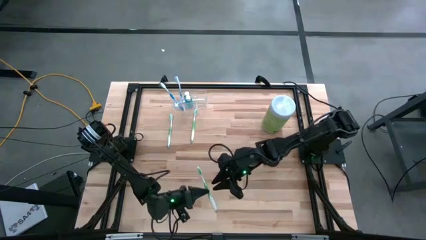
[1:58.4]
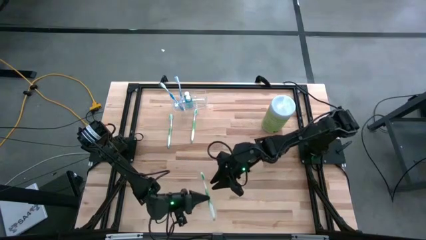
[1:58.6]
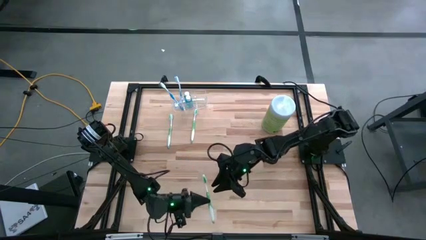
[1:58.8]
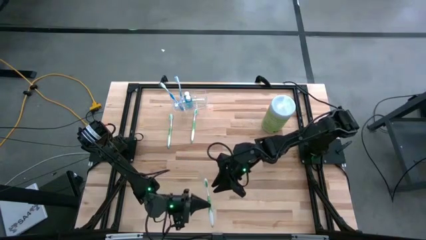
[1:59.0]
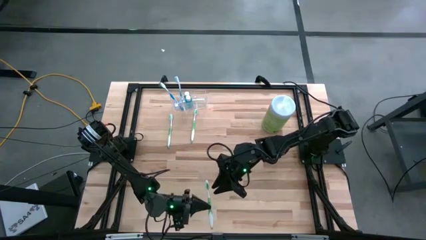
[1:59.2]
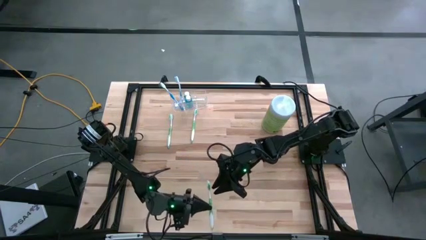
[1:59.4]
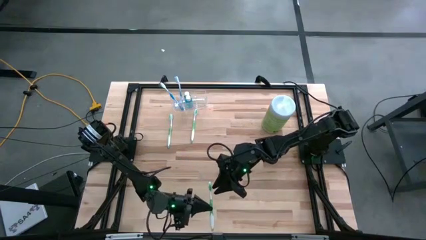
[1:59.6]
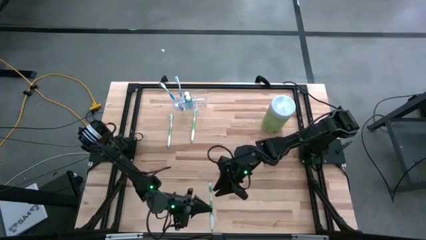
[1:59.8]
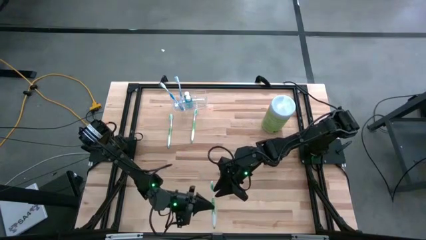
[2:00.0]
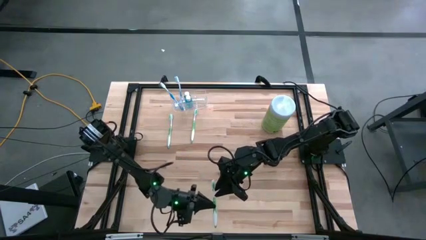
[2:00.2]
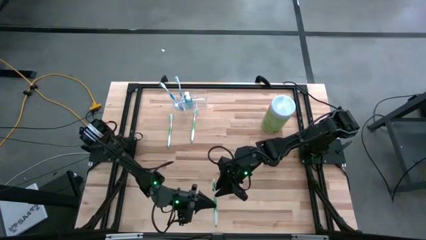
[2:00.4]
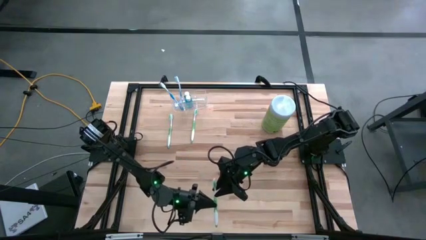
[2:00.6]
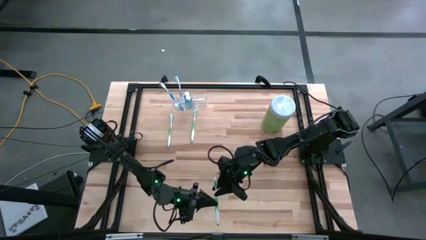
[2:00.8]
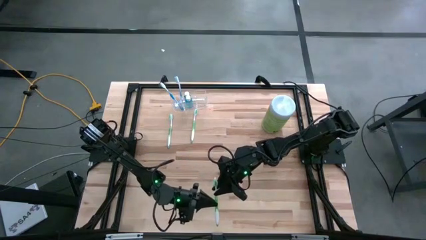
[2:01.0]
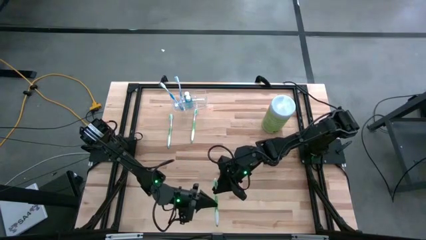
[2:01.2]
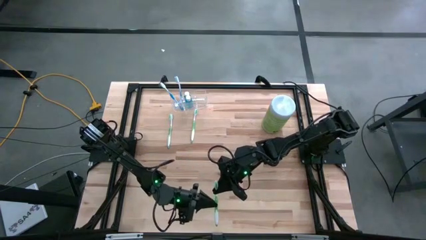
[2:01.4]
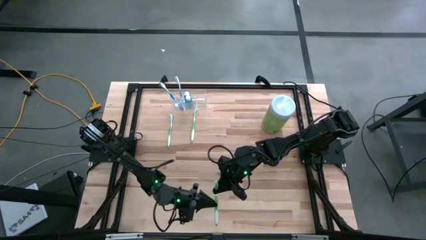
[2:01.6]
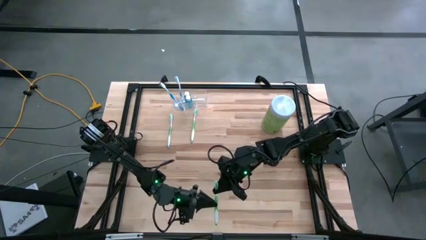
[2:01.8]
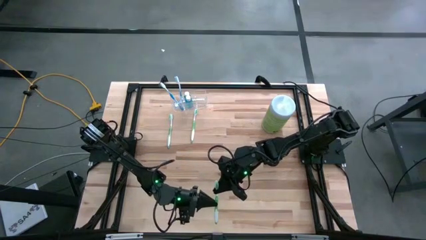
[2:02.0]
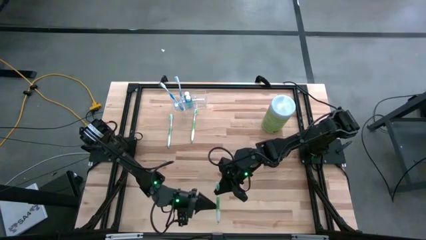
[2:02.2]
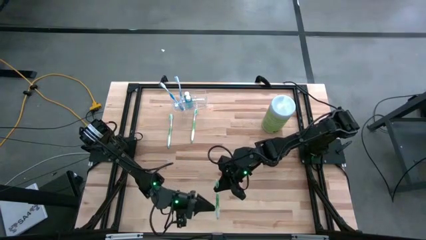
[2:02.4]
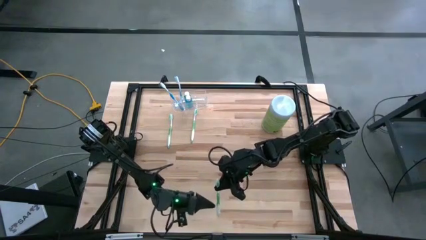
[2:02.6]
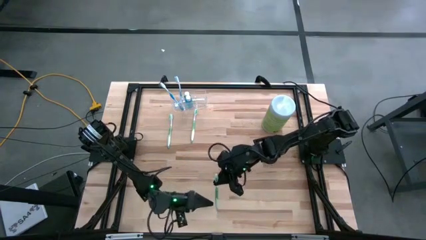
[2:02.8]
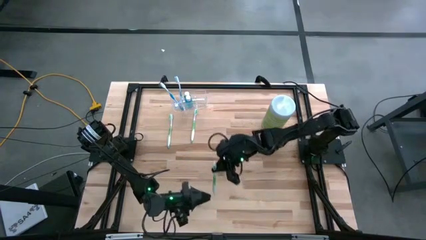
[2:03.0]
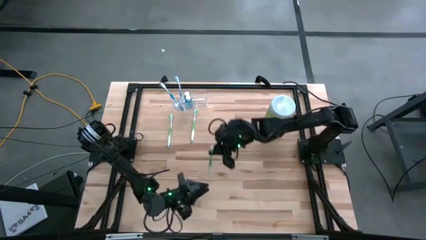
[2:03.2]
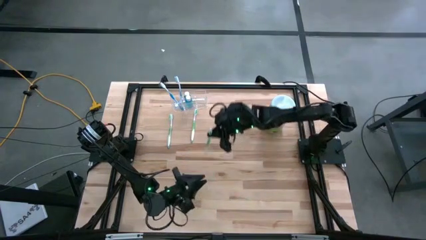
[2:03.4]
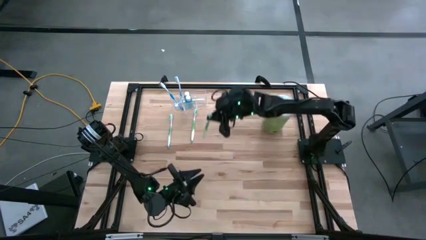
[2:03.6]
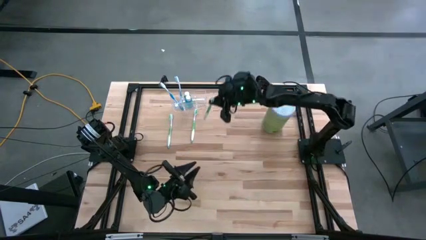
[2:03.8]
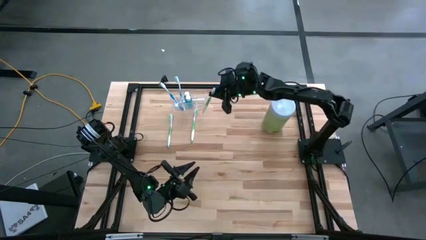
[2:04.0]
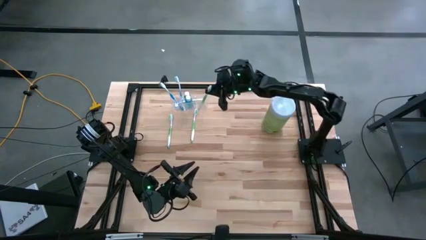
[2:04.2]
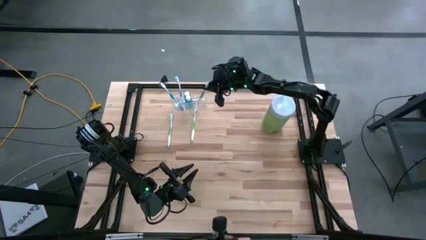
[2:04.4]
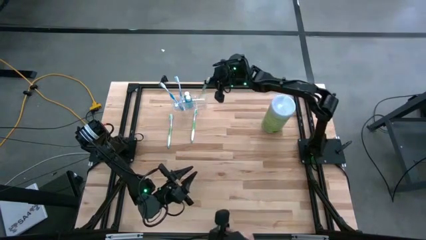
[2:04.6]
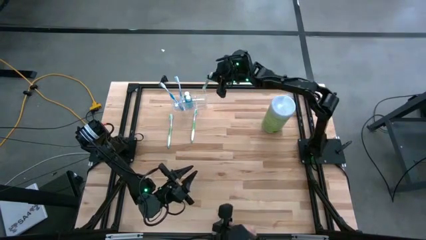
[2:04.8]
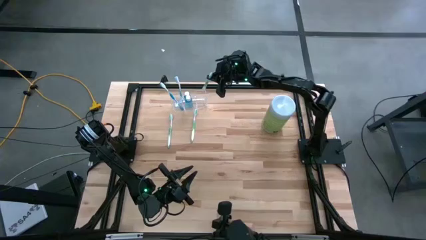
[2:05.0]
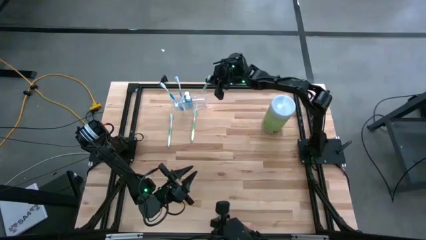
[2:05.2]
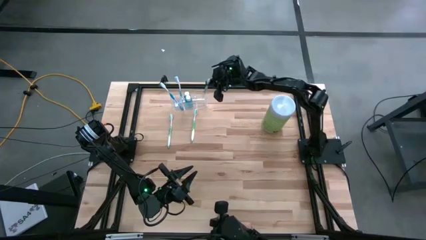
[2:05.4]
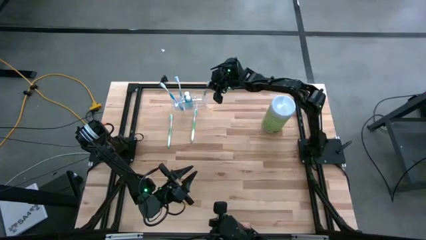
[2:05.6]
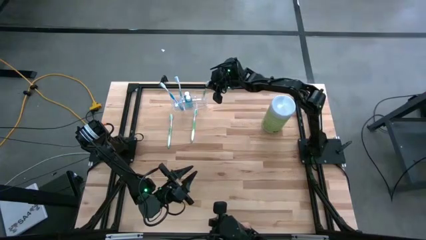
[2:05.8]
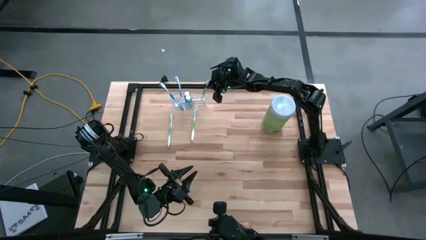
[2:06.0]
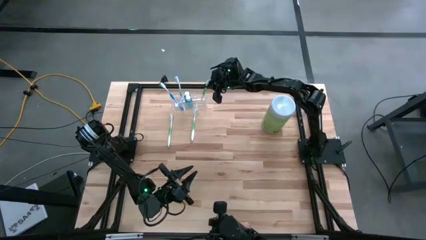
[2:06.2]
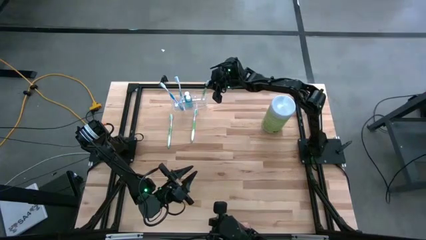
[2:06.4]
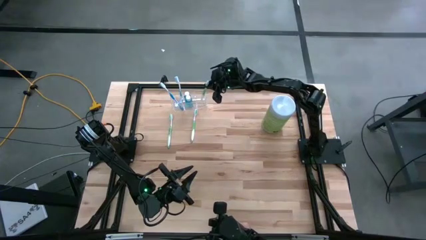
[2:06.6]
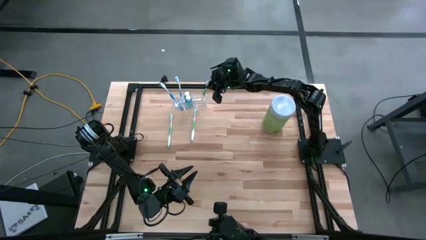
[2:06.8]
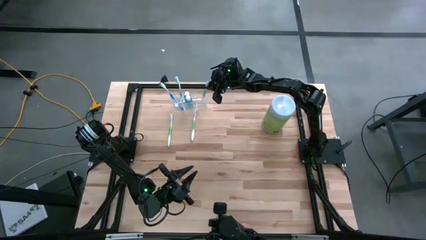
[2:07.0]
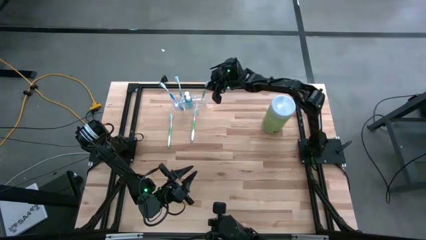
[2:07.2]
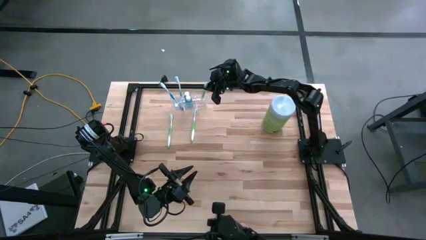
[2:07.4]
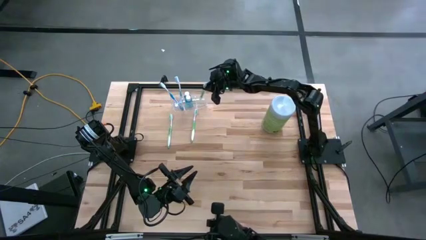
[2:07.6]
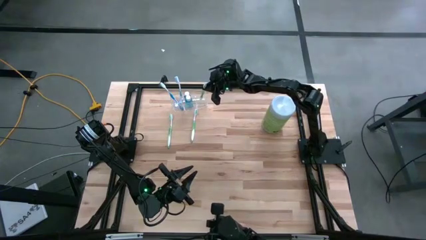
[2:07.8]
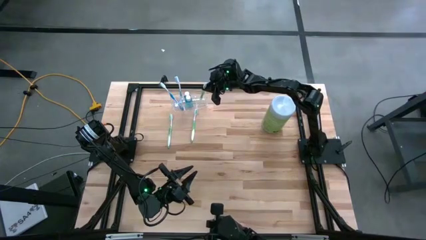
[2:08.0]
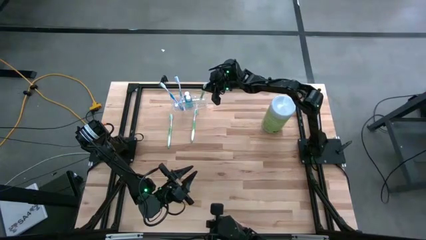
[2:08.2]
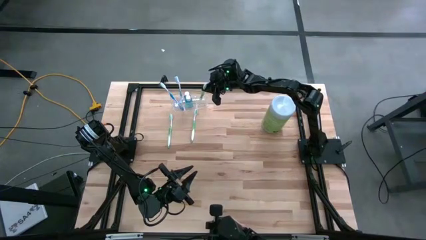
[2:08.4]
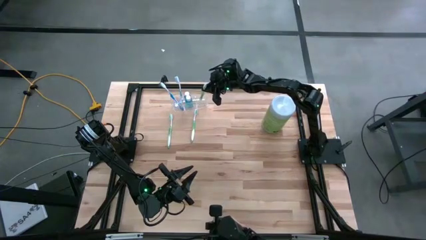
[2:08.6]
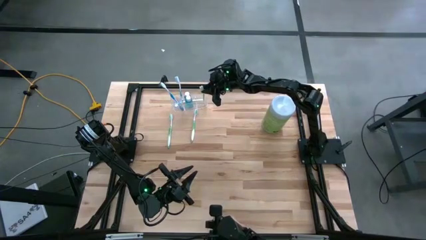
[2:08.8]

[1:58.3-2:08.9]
Task: Pick & Place toothbrushing station
Put the bottom green toothbrush into the right section of the transparent organizer

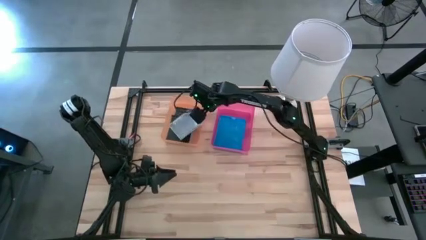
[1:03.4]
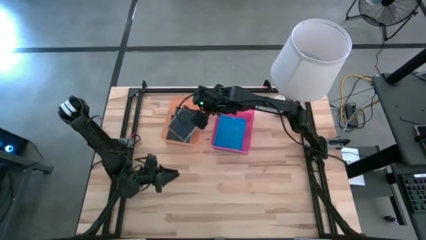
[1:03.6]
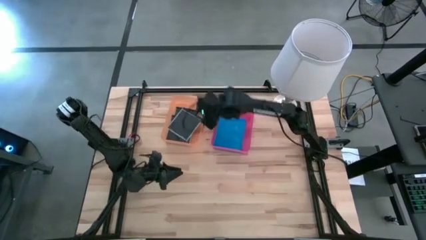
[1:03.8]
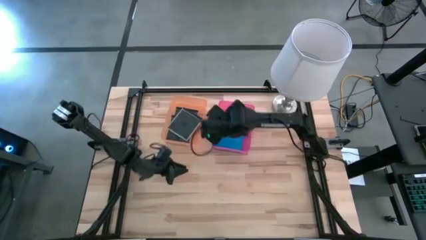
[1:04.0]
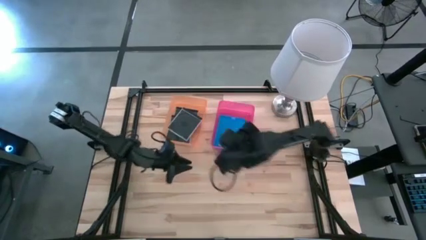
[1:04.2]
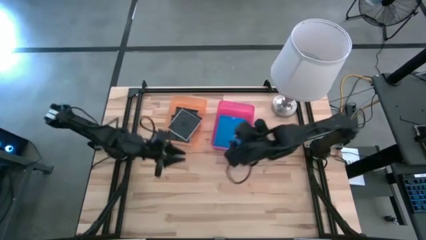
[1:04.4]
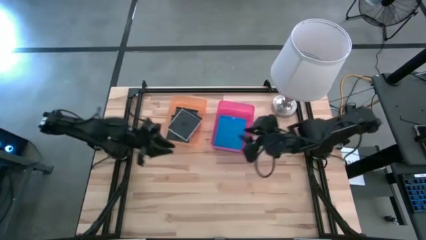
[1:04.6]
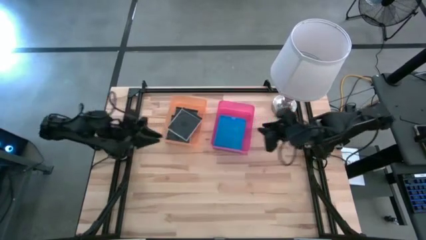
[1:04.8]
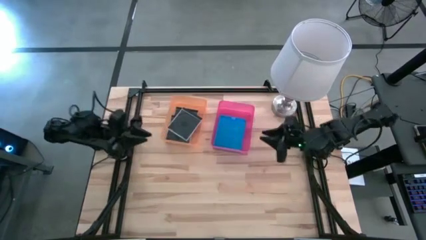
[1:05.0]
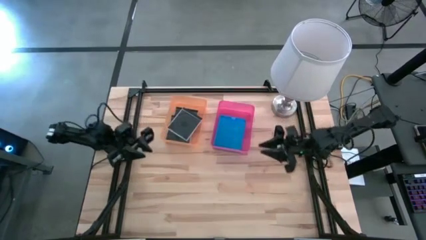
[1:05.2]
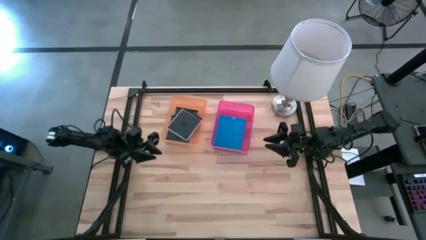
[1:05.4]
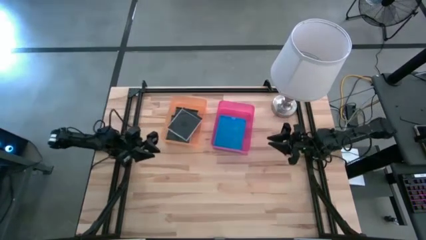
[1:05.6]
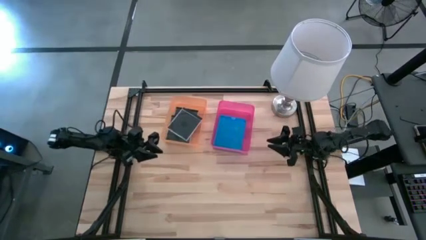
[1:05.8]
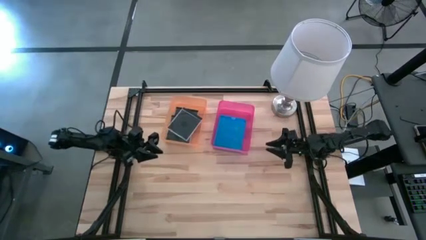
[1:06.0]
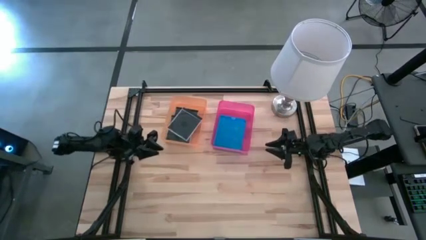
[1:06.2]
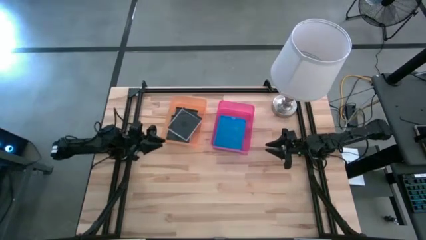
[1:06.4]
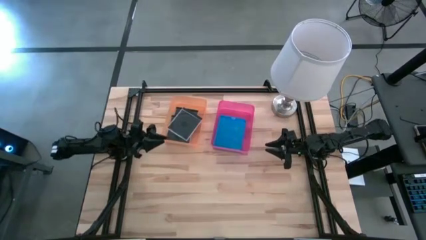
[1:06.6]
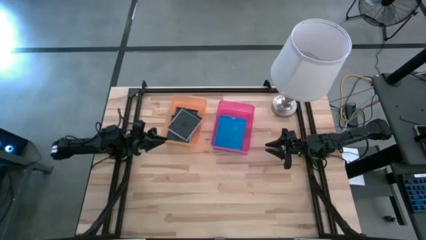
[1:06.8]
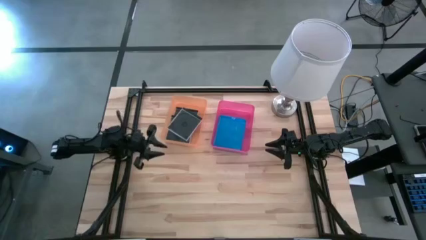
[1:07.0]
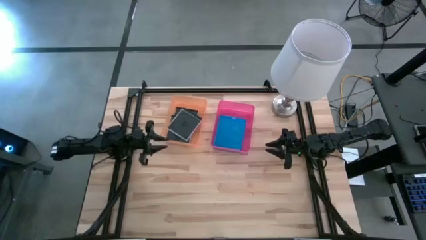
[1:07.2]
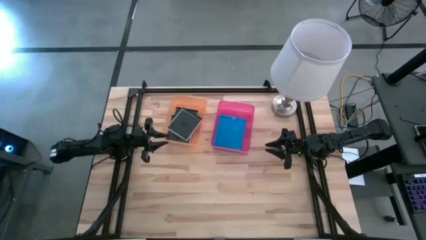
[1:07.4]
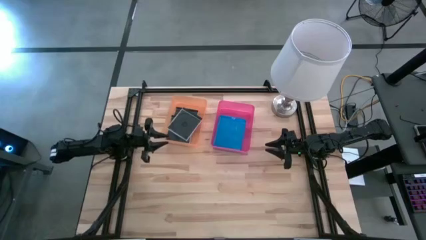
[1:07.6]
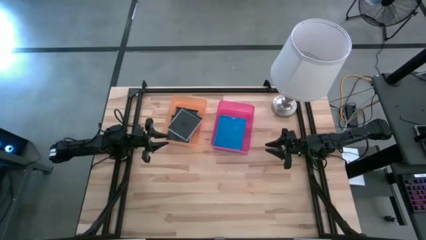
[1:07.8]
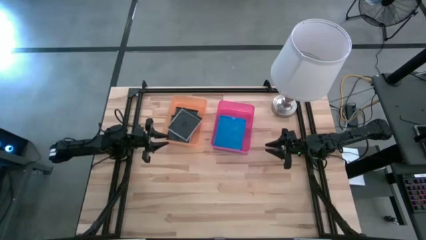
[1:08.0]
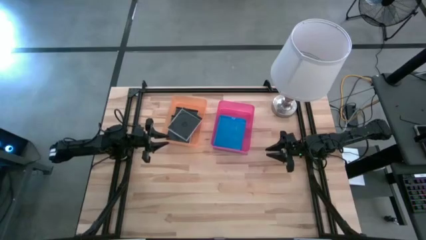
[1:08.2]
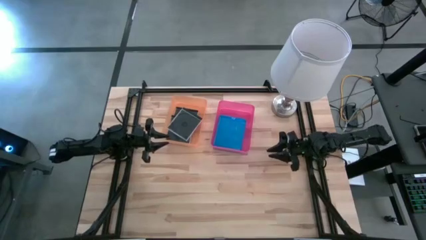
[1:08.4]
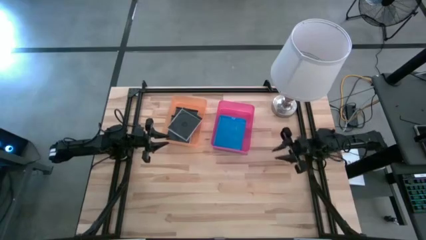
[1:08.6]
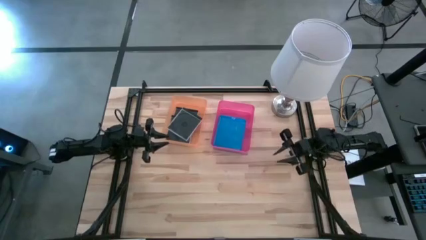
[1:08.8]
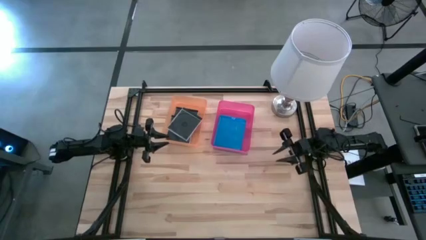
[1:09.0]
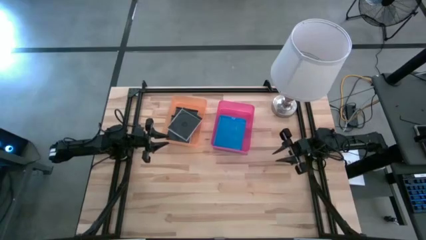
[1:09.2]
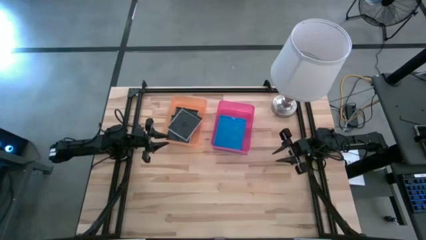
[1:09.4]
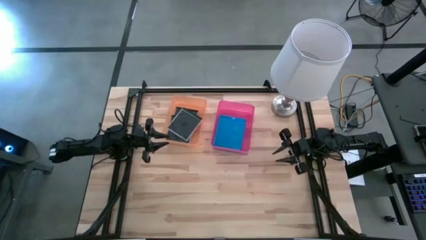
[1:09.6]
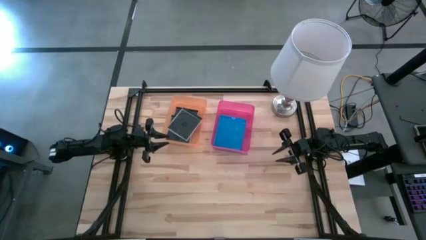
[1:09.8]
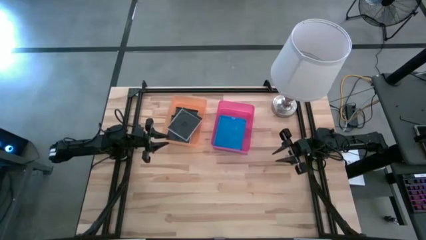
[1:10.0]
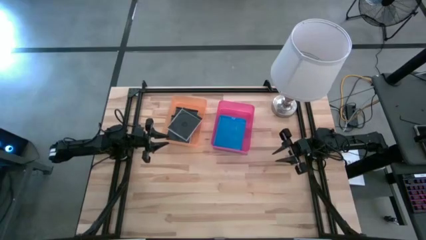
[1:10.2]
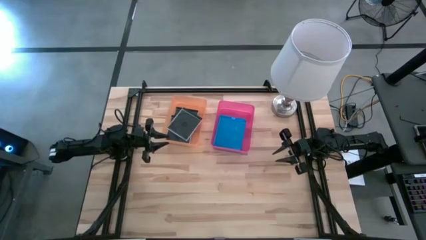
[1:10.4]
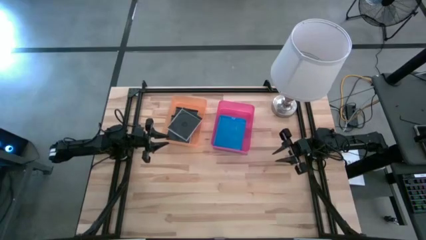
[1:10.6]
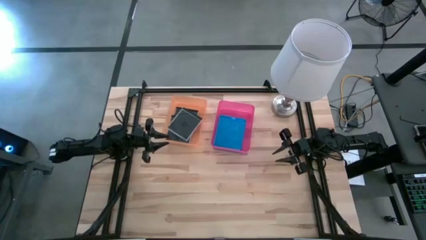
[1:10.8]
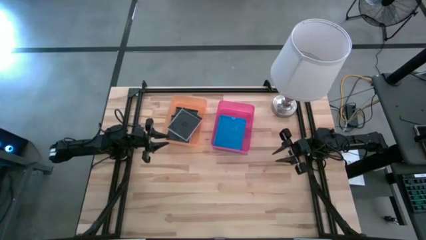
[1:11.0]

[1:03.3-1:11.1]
Task: Pick & place jewel cases by type
Return to Home Position
